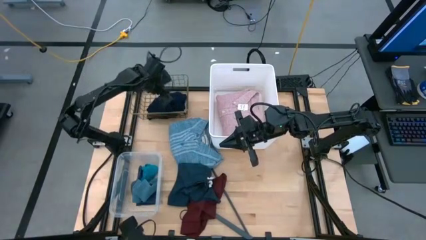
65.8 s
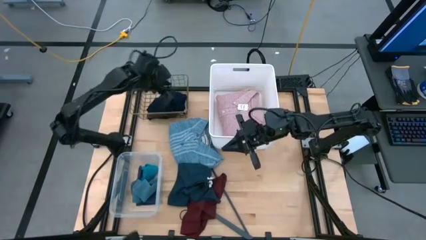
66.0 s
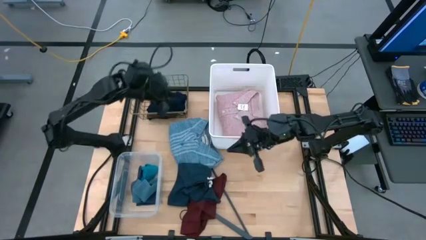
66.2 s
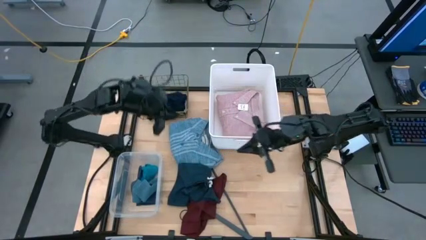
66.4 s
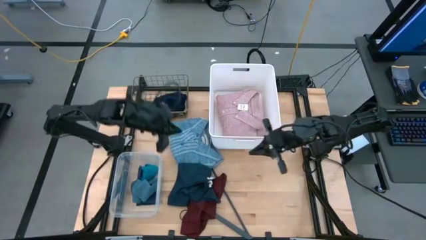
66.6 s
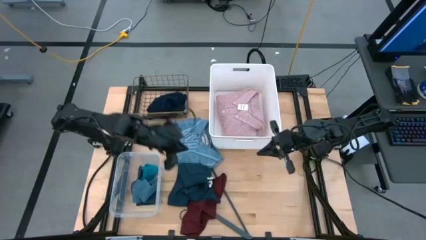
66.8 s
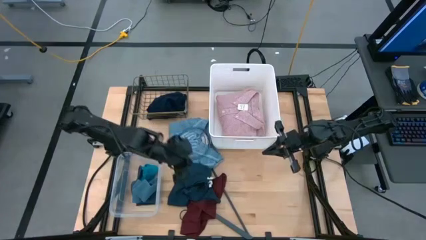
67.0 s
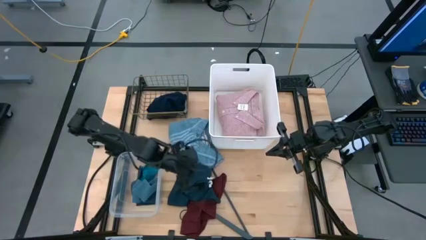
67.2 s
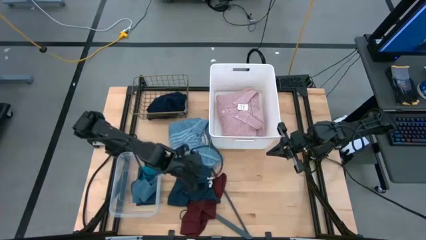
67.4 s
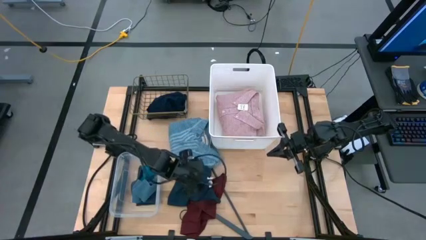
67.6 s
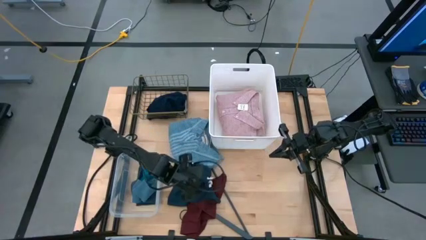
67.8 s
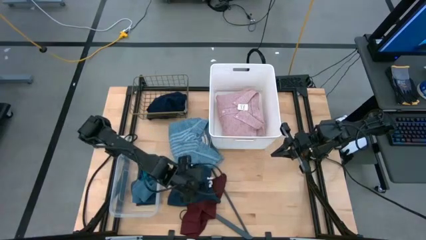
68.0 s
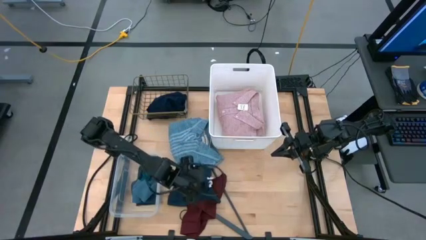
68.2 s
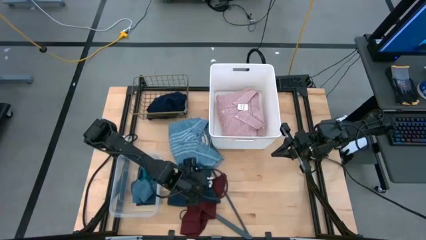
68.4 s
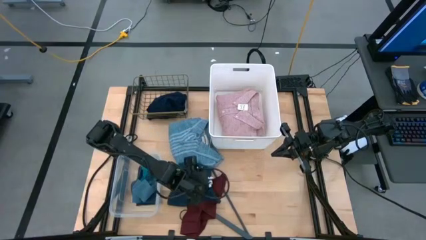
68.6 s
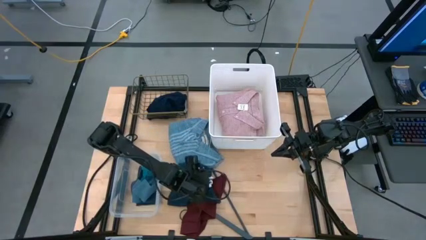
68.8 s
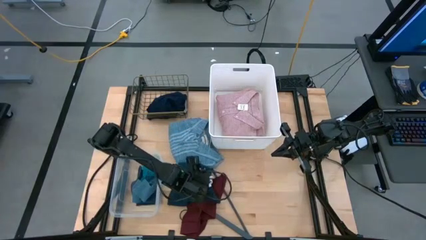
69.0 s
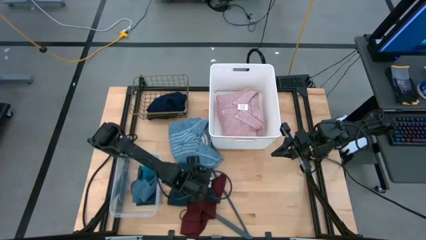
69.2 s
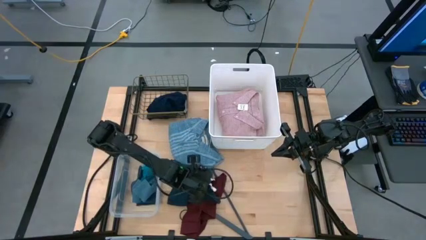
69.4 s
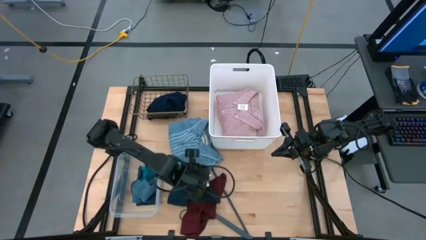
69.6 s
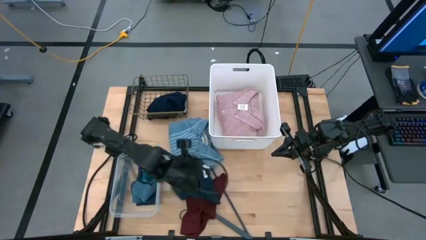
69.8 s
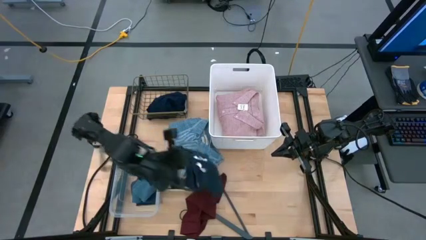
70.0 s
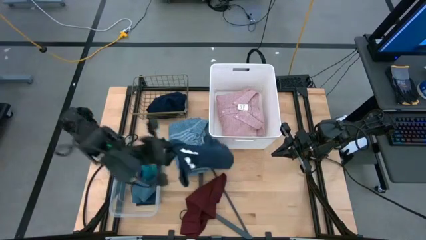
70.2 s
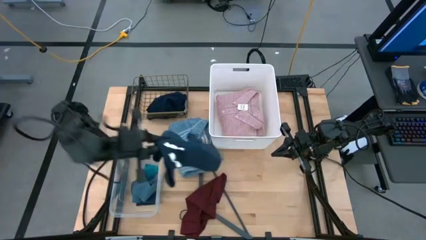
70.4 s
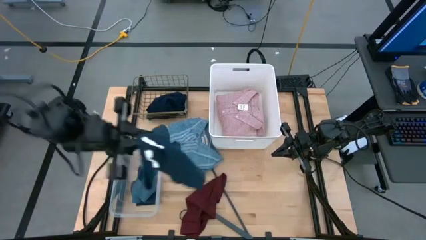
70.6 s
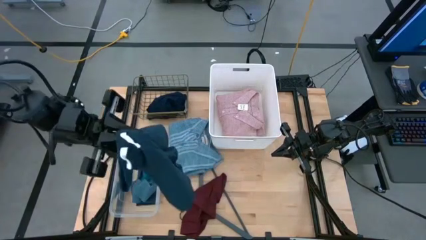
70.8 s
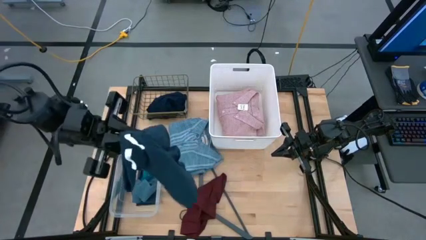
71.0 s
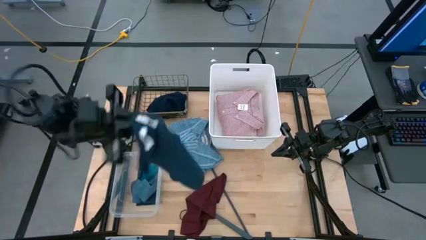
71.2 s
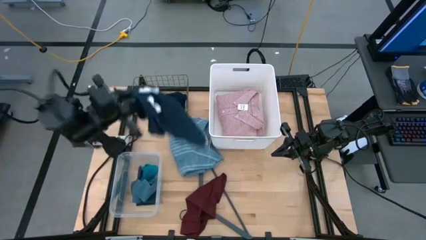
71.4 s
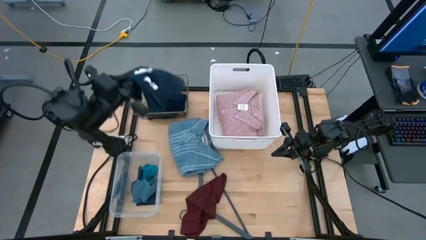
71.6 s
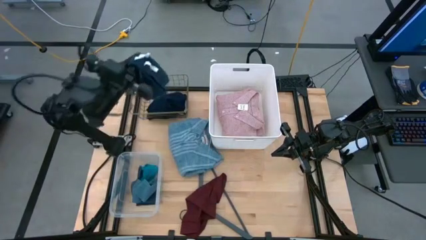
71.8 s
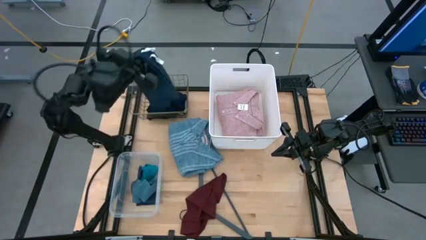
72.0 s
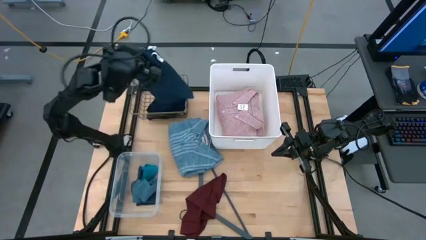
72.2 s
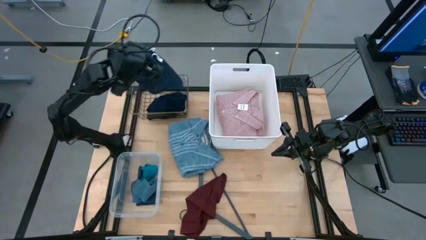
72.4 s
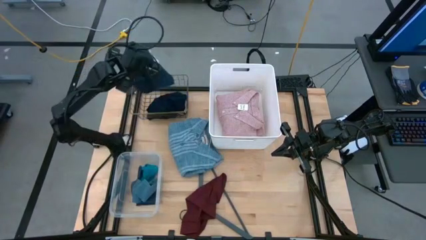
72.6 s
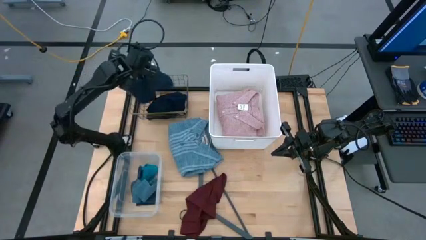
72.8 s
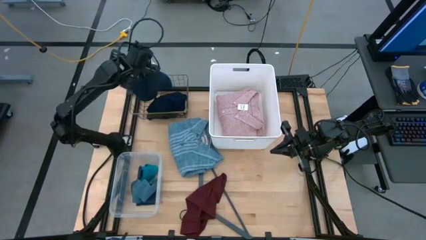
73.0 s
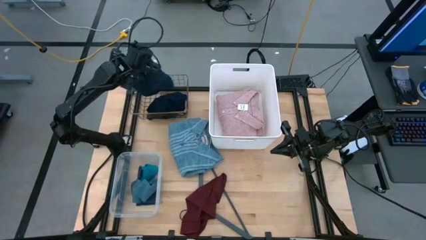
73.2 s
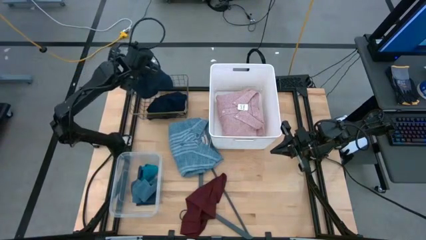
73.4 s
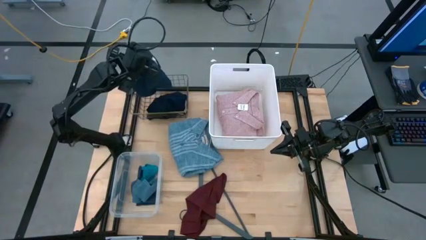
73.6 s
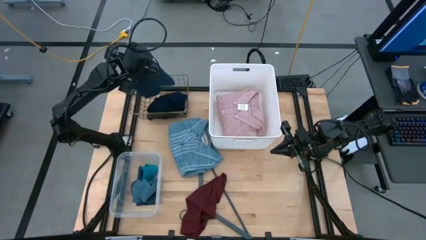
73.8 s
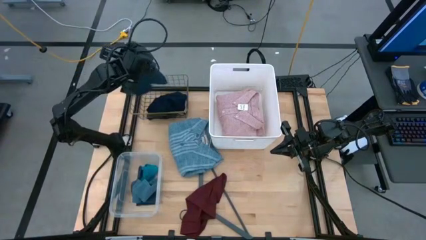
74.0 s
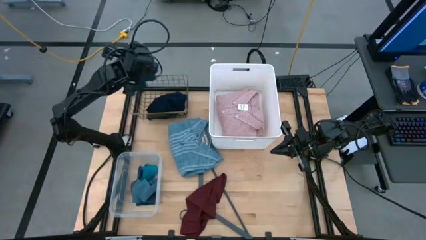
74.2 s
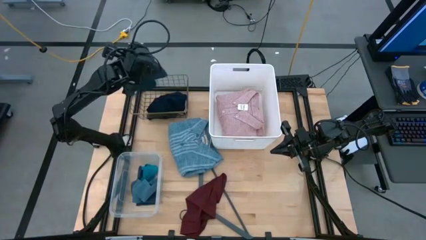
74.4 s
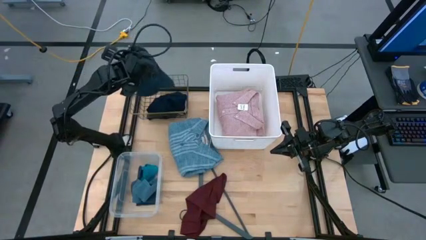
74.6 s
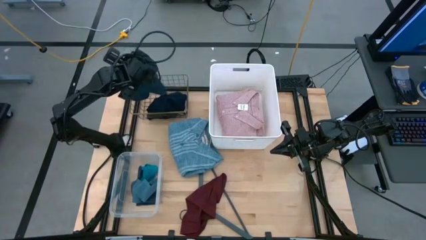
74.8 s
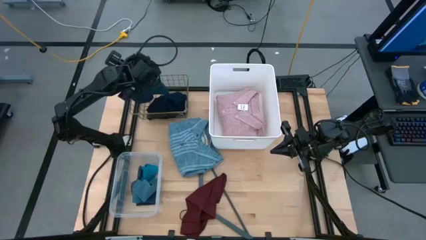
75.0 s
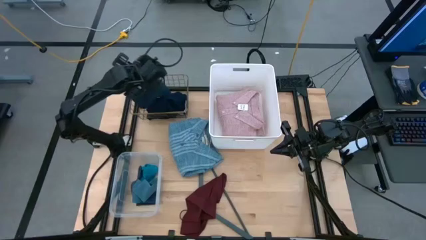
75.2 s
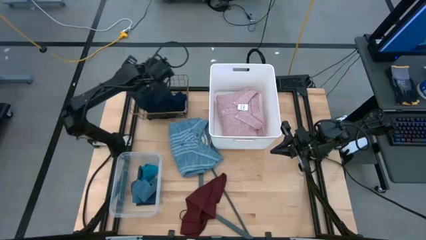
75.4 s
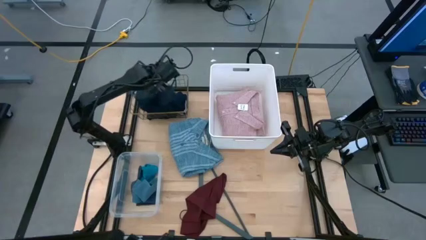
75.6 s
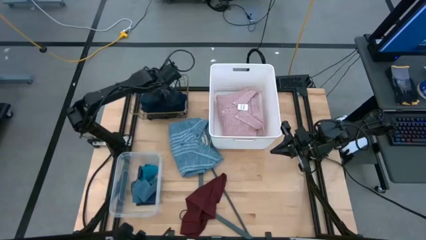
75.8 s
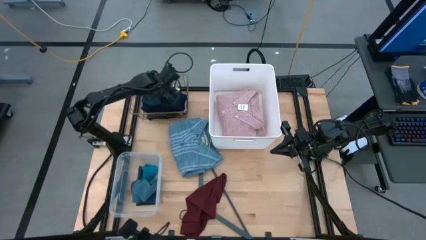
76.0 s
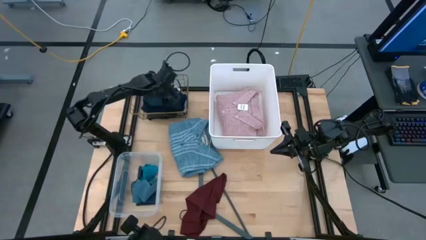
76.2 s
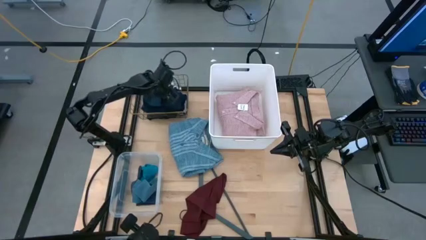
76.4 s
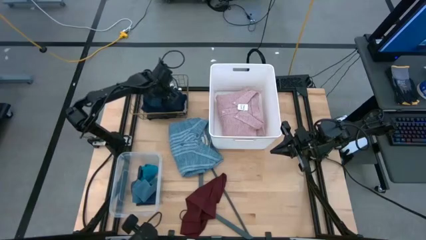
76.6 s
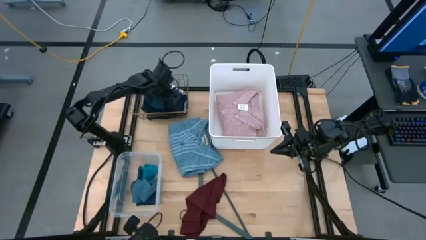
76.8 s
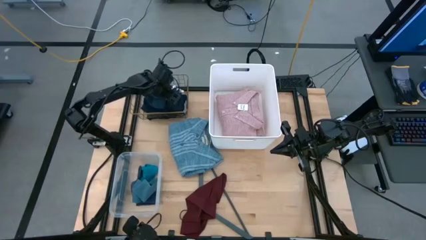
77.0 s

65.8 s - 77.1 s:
Task: Pick & Place Cloths
Put the blue shorts into the brown basket

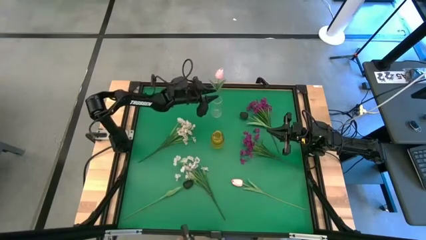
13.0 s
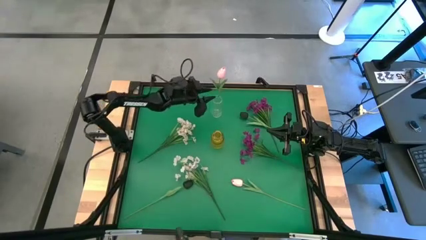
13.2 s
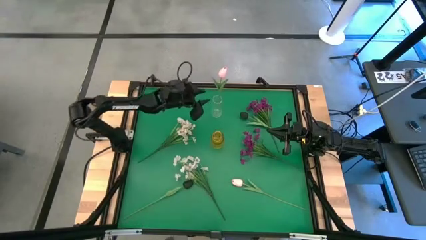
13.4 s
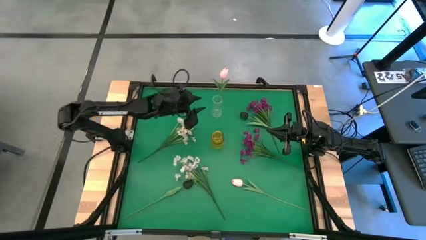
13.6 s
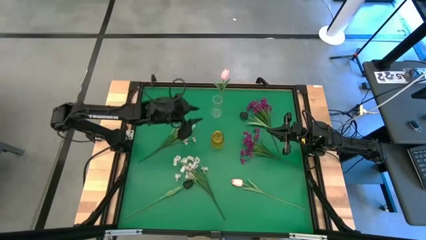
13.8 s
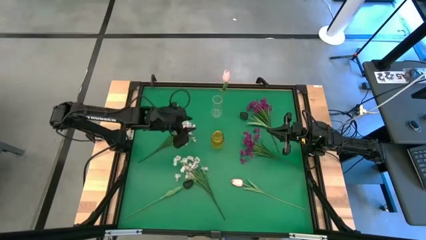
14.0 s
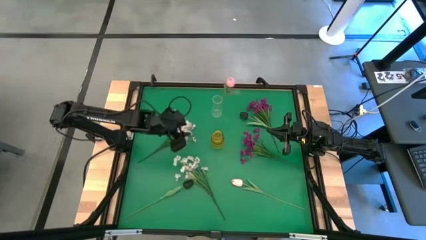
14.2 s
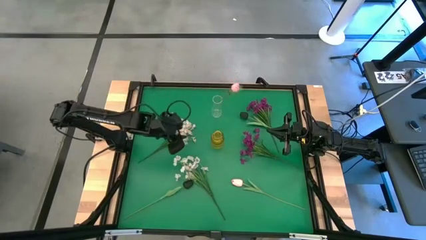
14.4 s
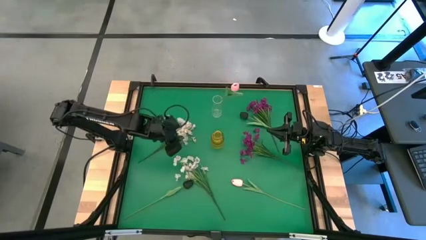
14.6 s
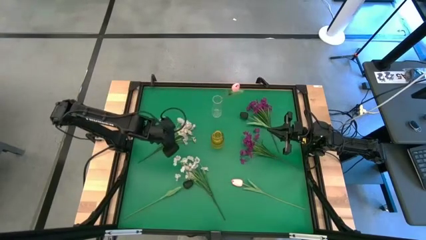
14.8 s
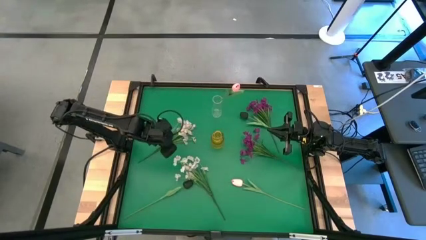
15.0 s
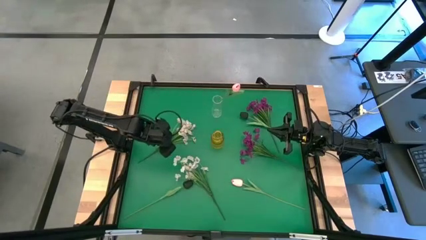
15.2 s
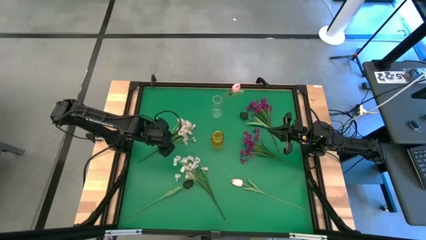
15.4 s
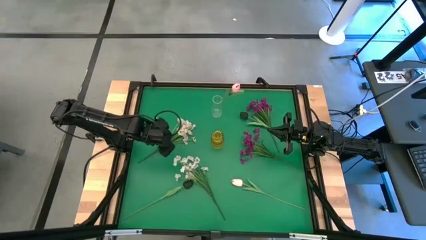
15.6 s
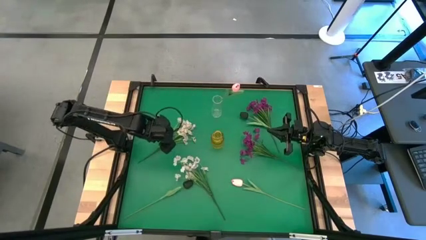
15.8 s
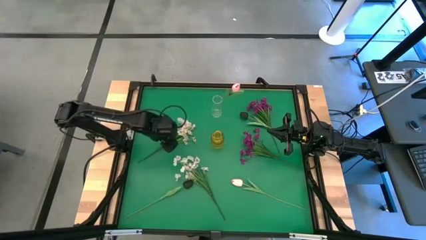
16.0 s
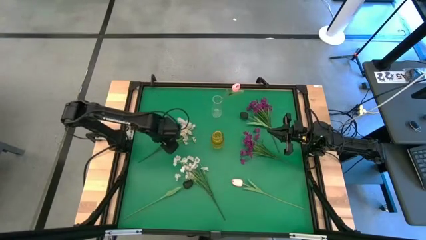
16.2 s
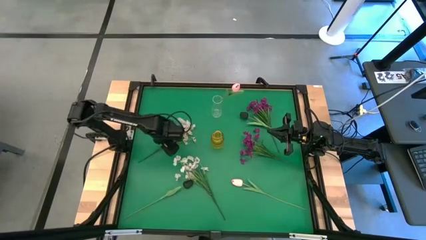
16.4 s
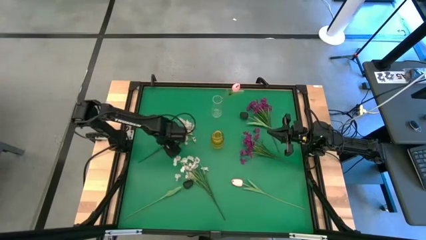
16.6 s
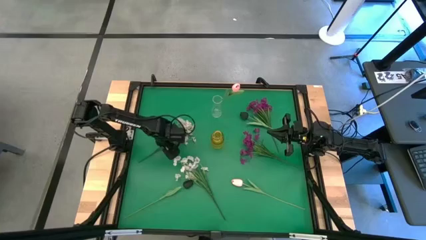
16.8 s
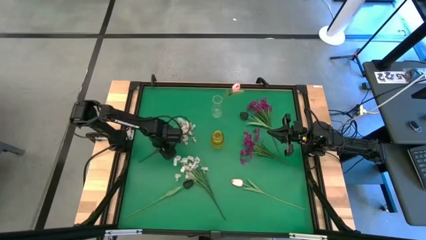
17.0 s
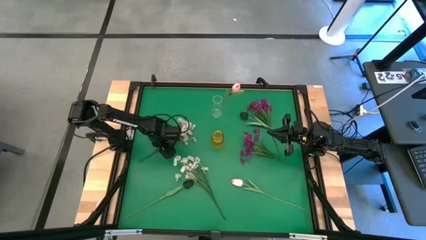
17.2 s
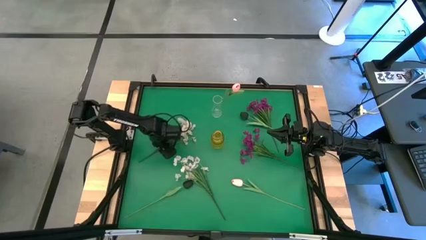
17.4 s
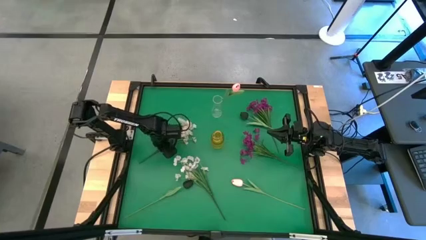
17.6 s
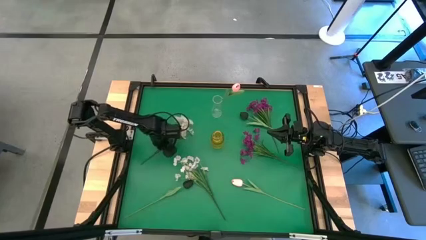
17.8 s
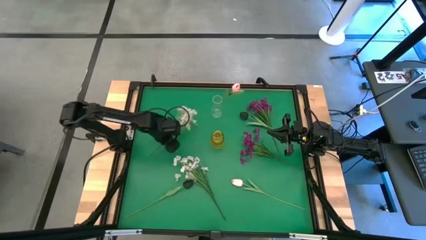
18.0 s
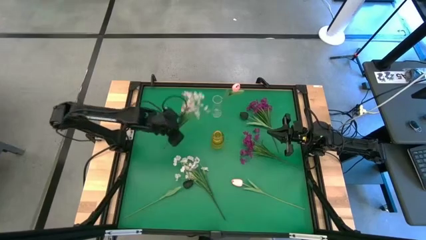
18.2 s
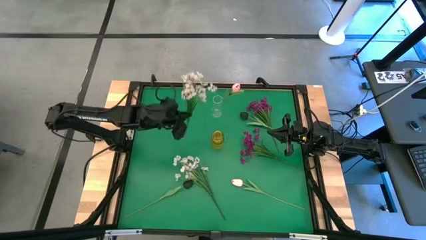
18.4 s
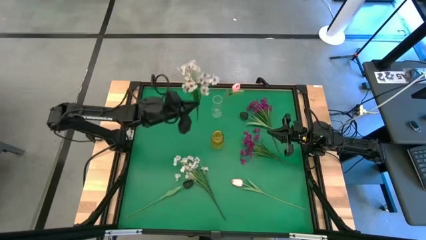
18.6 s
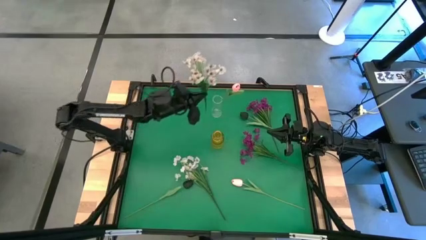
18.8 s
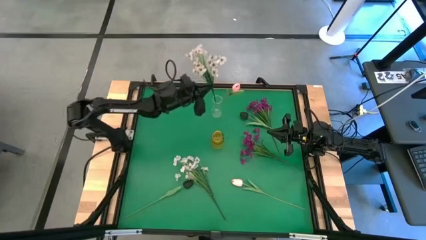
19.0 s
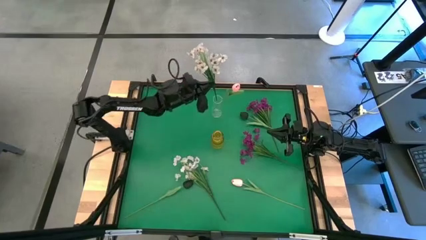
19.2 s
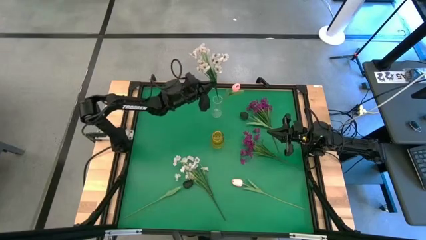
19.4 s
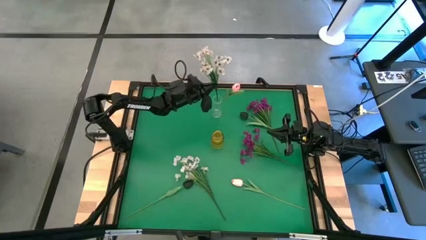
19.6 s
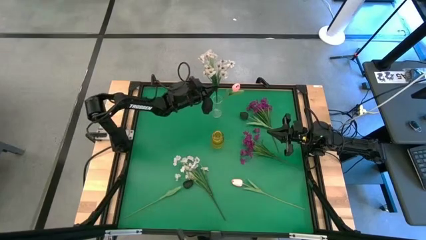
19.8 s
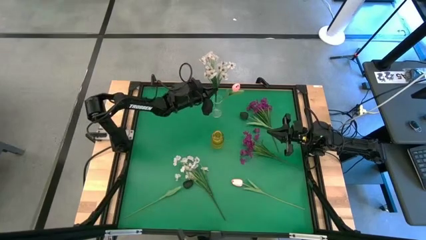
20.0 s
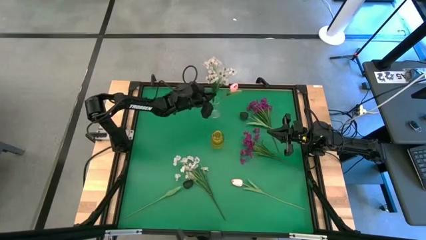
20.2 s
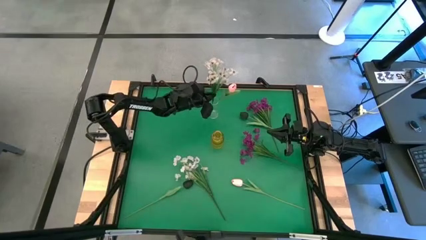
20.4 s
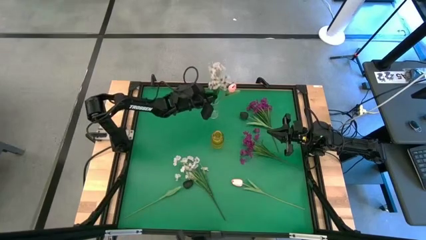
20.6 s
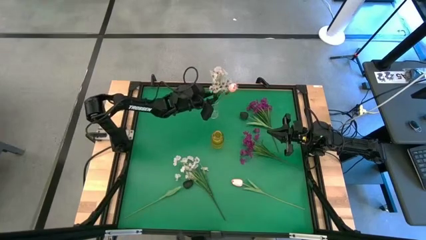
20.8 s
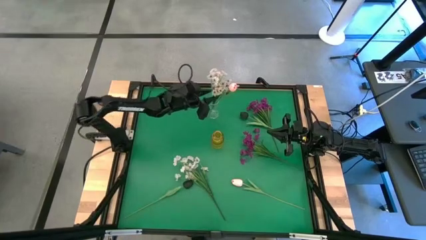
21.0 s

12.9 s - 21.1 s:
Task: Sort flowers into vase by color
Put the top white flowers into the transparent vase
